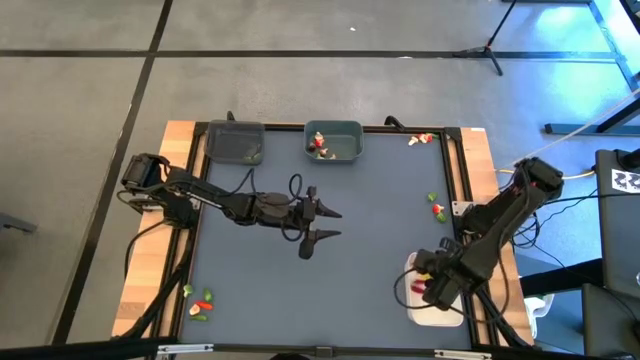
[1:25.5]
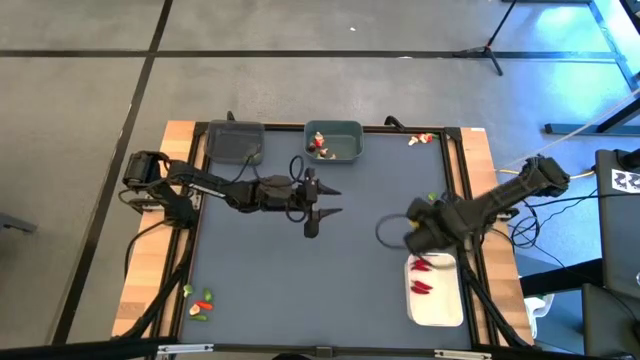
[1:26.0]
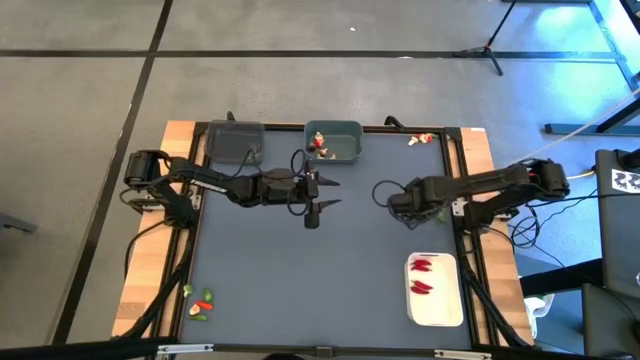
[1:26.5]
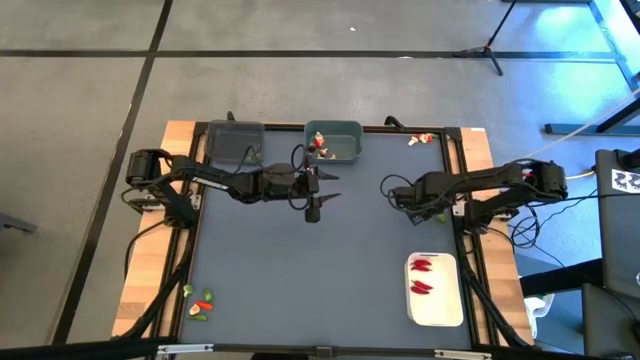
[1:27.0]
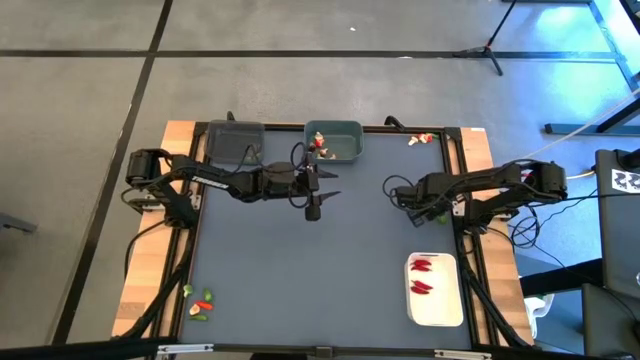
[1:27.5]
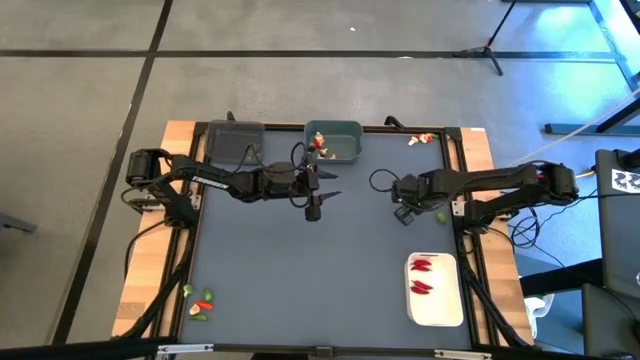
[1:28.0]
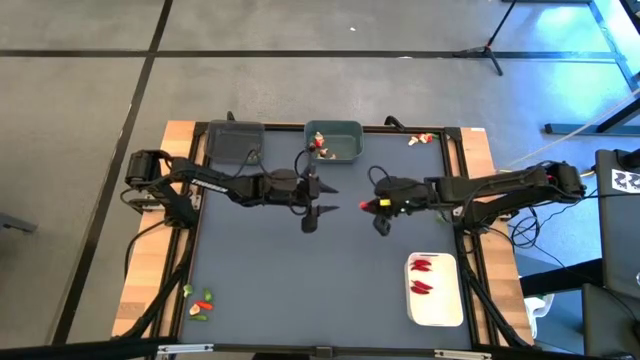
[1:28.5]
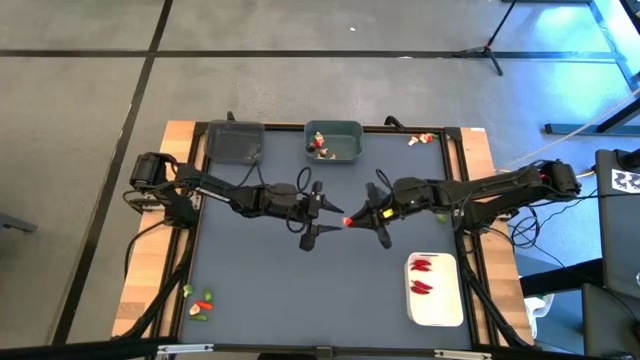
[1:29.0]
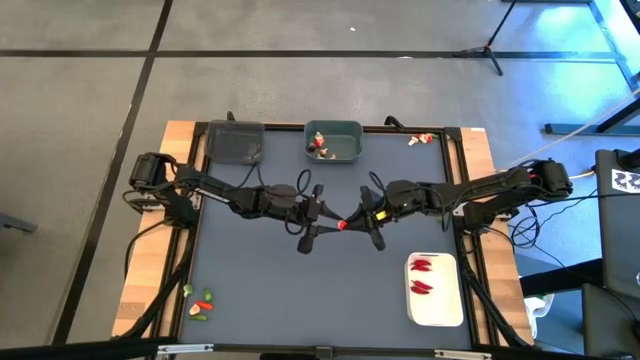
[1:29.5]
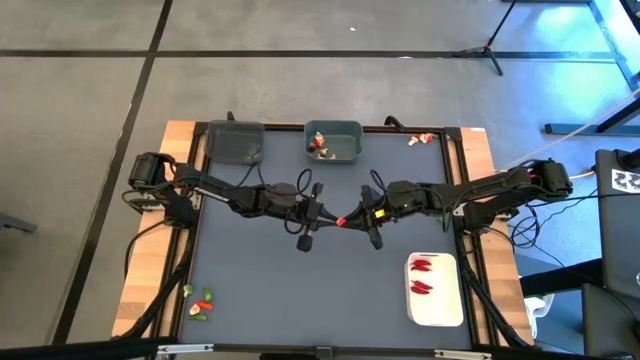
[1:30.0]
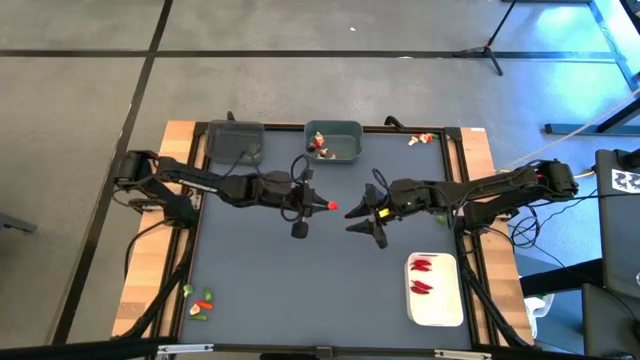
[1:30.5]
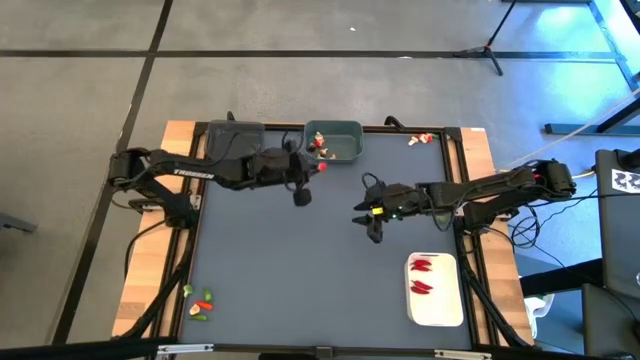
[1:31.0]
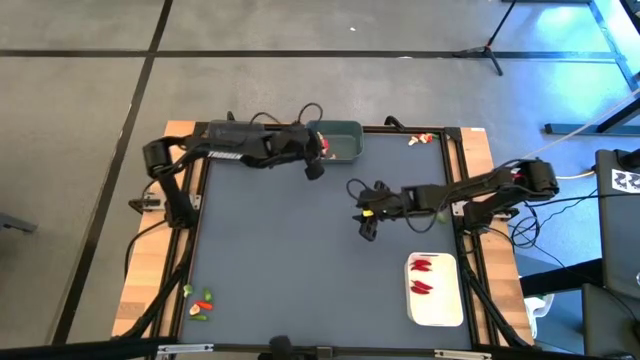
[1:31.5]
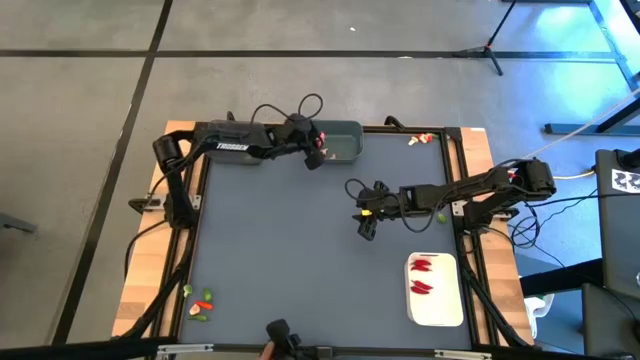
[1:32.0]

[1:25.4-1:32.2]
Task: Sort produce into baskets
Put the red mushroom into the blue bin

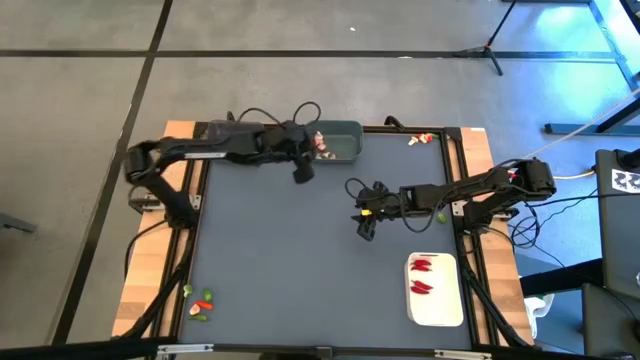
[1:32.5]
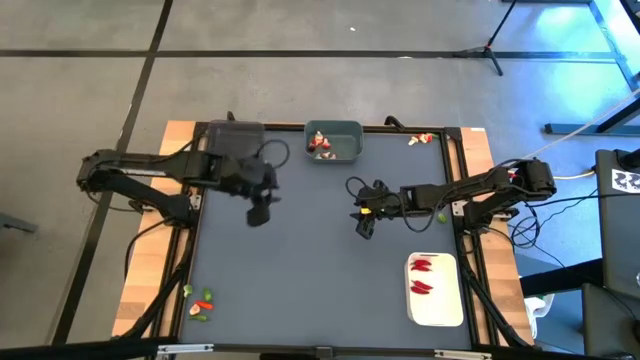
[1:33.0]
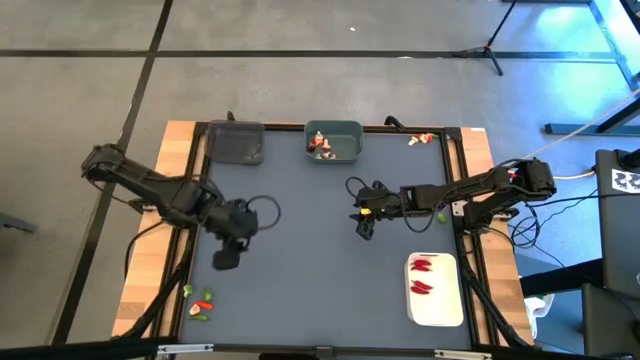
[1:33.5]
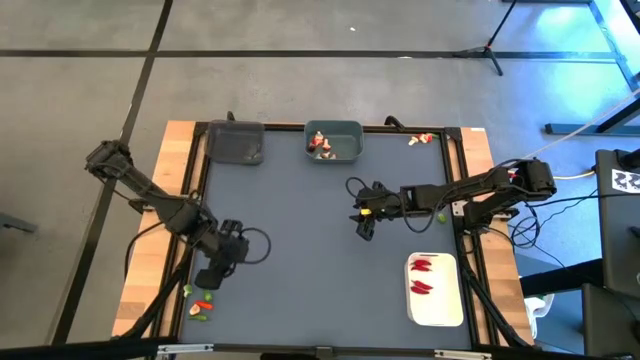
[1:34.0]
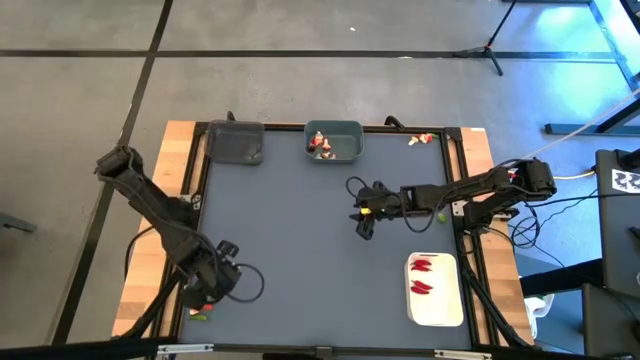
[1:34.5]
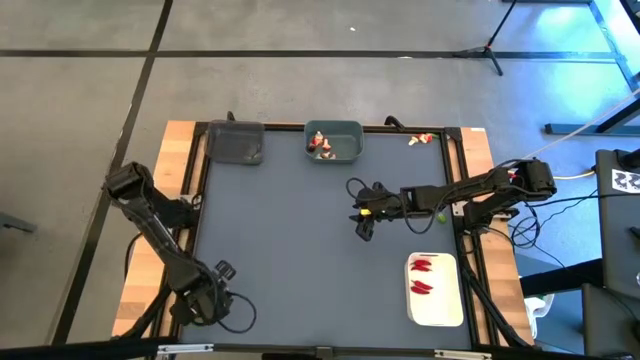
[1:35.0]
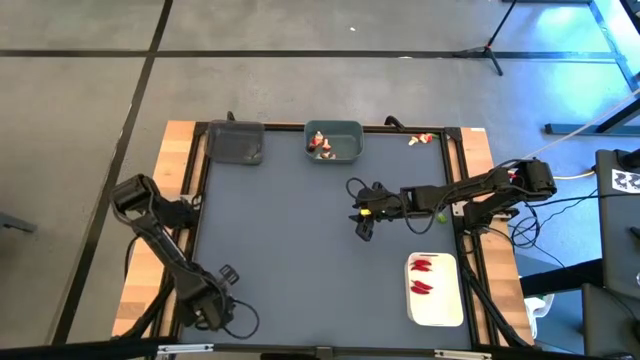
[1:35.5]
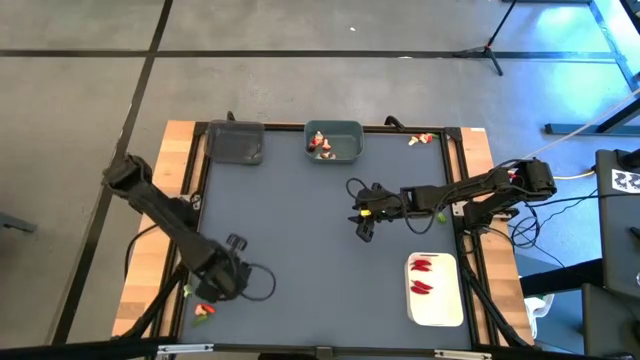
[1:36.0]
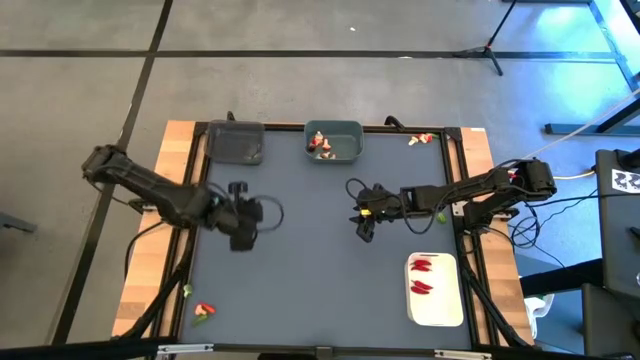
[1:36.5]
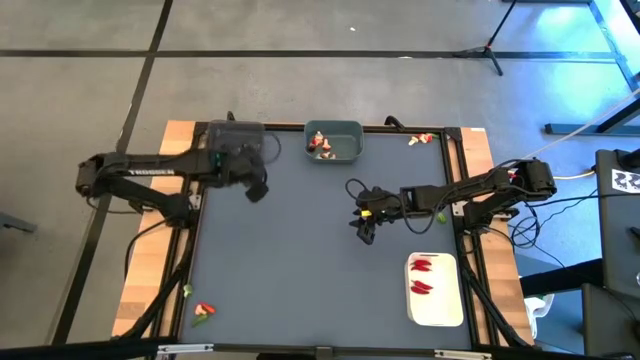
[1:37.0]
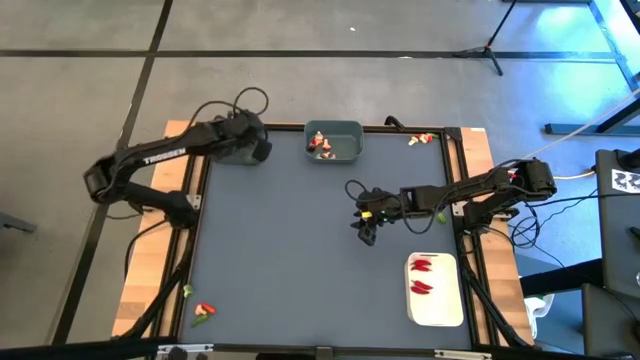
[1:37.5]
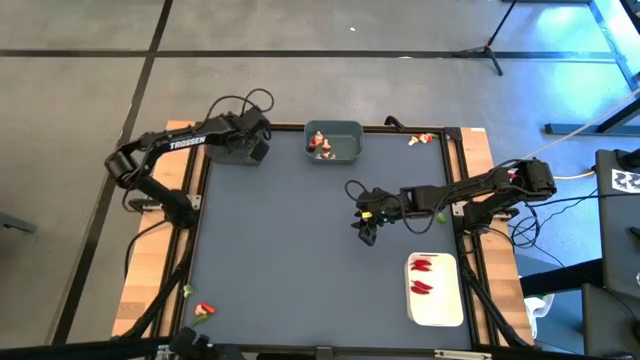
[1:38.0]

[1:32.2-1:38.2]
Put the green chili pepper into the black bin

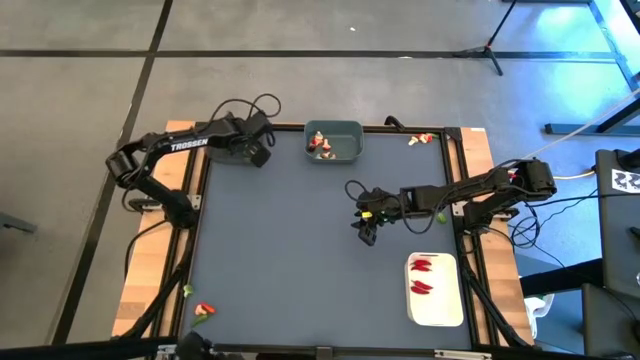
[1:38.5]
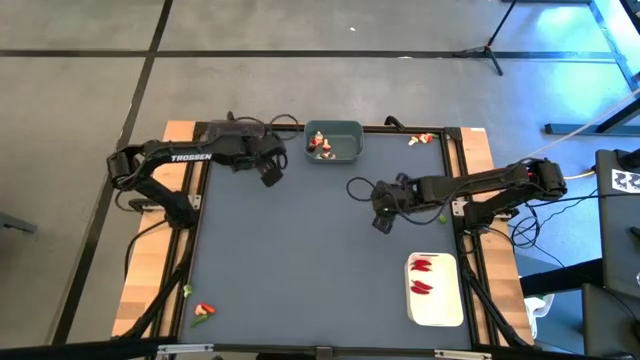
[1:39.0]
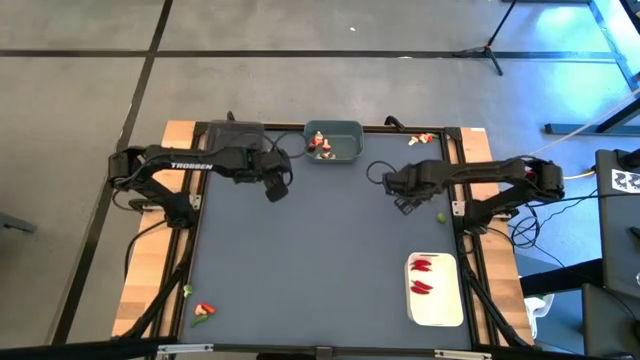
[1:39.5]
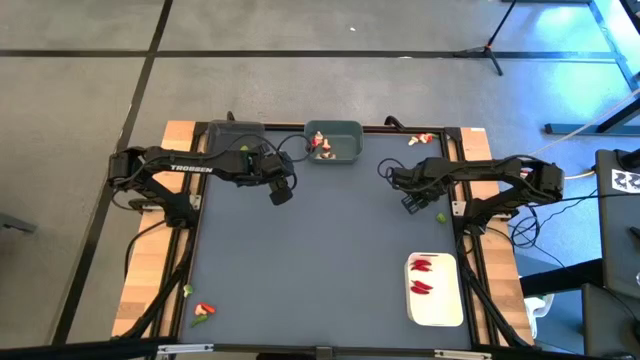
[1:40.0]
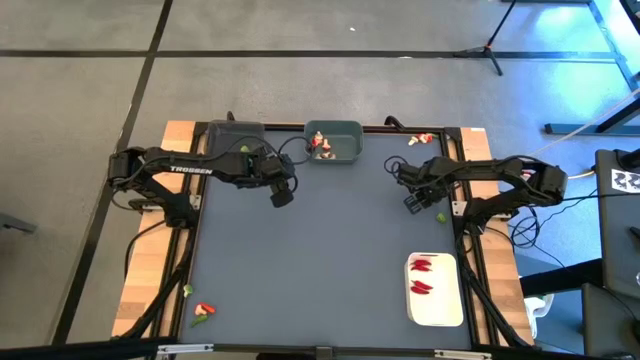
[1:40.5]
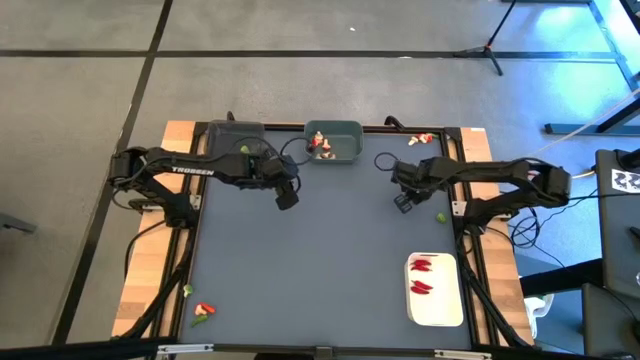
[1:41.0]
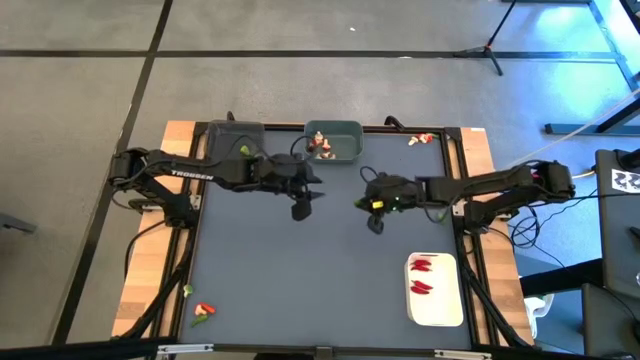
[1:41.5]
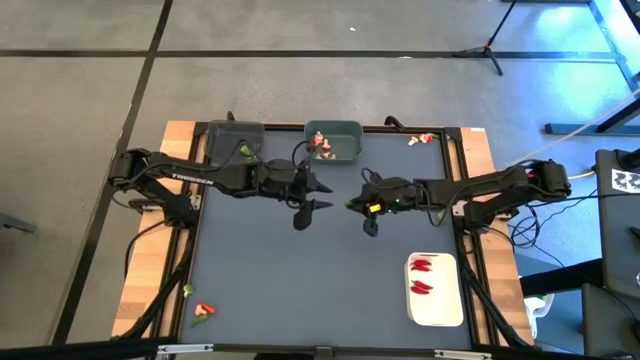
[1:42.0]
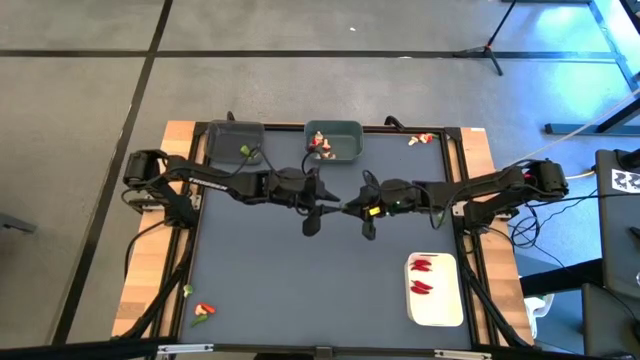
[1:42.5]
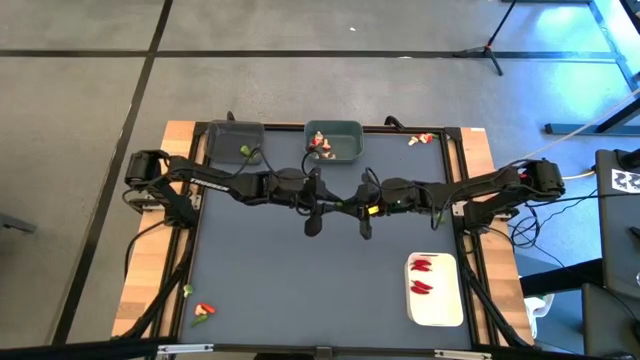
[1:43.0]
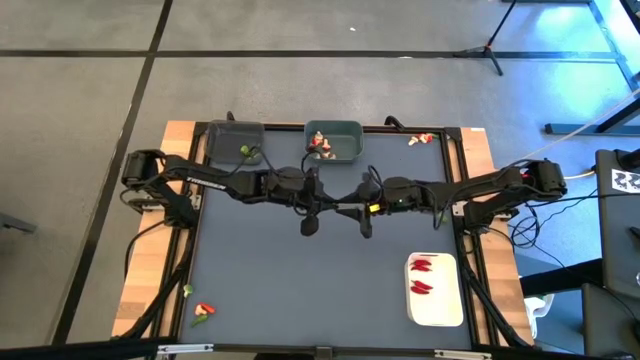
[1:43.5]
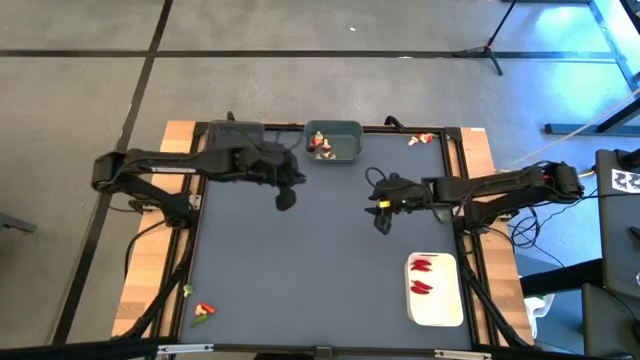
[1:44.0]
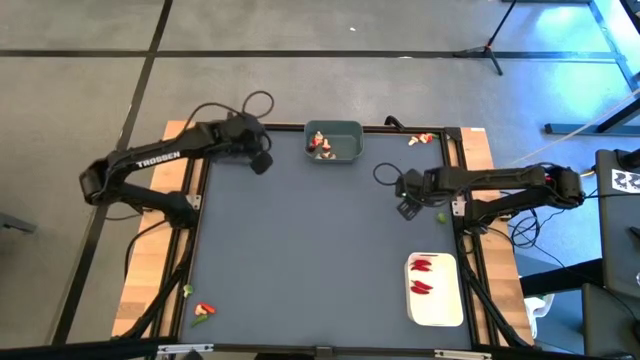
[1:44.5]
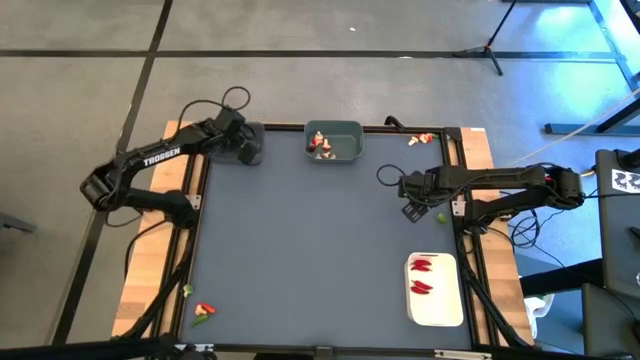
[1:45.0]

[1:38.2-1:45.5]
Put the green chili pepper into the black bin

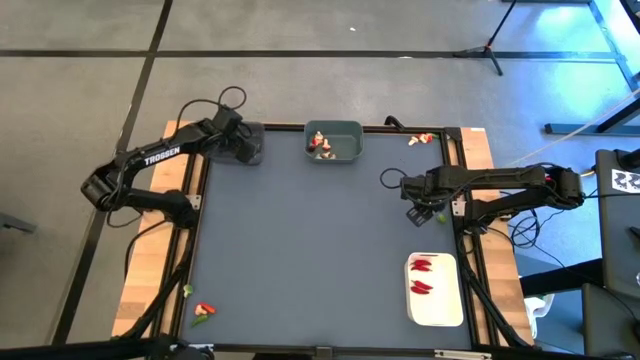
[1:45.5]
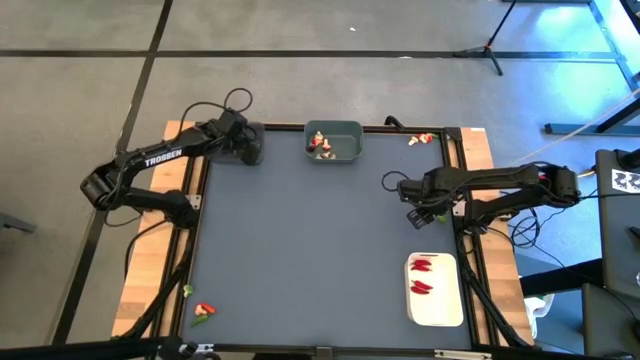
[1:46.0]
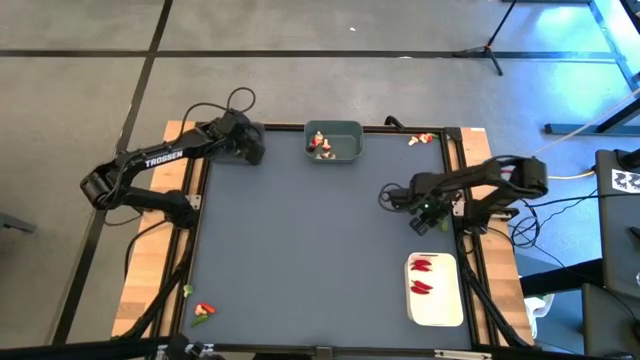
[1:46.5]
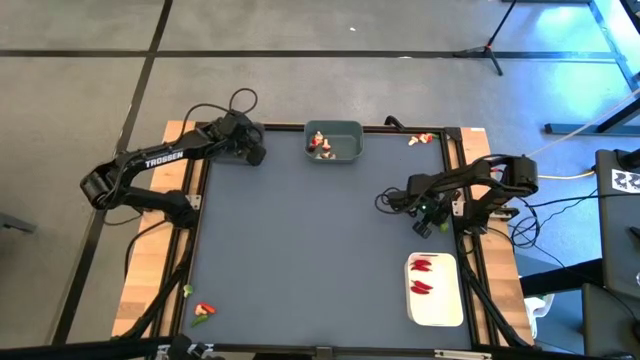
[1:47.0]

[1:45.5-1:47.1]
Put the green chili pepper into the black bin
